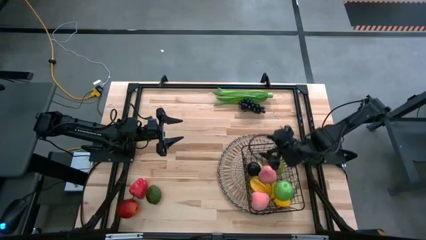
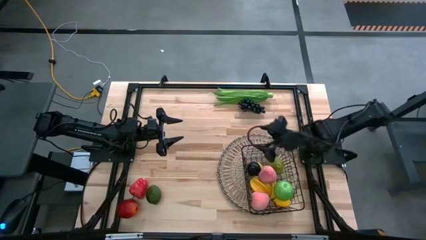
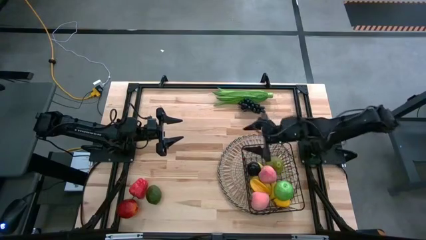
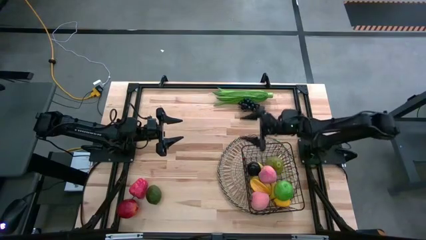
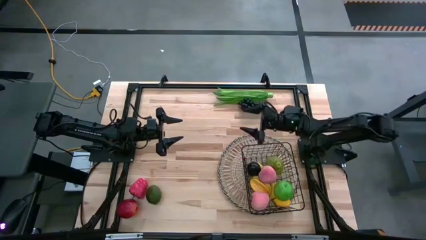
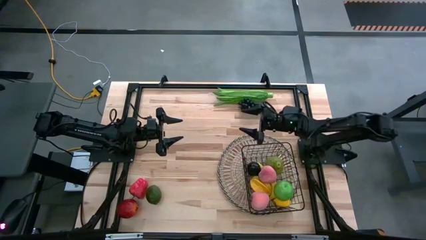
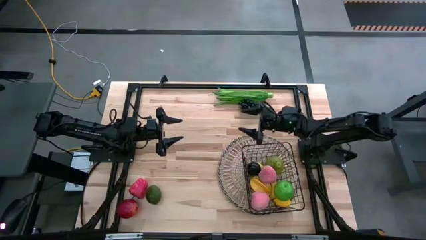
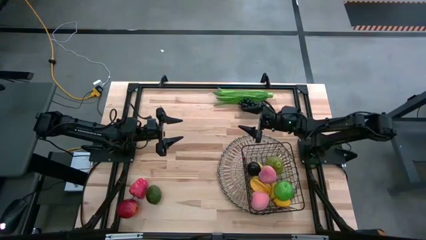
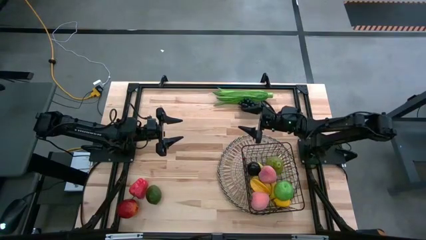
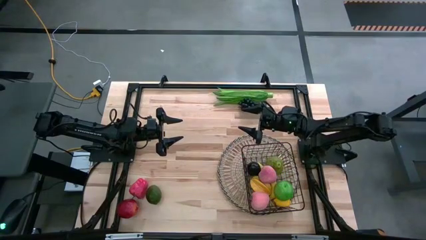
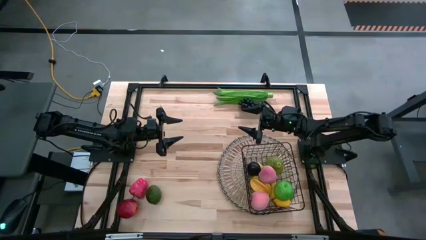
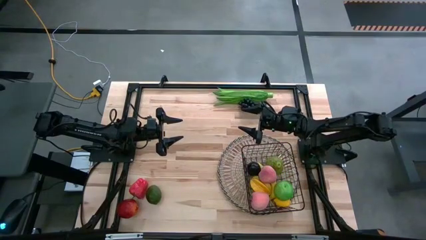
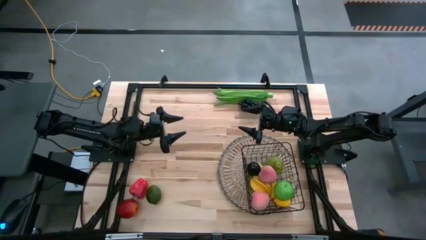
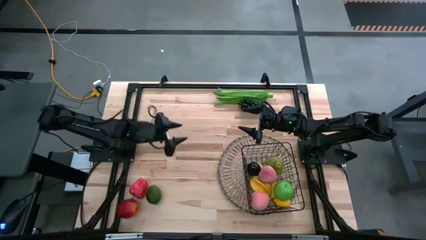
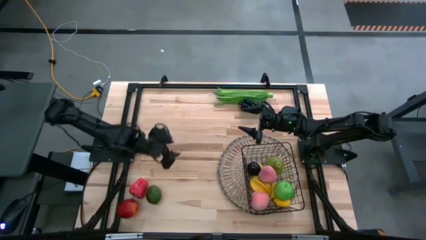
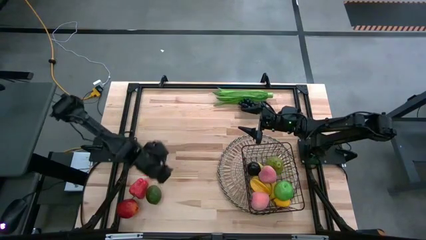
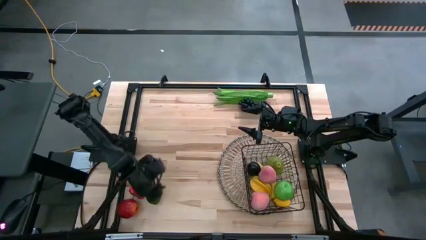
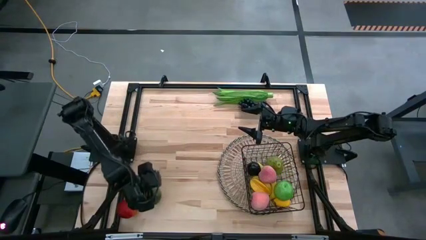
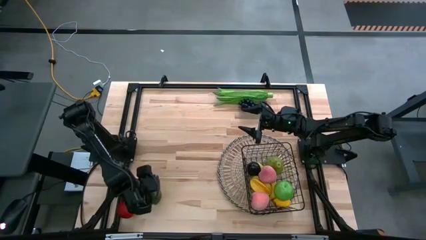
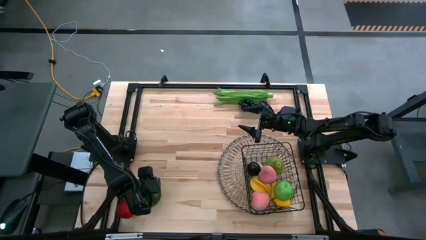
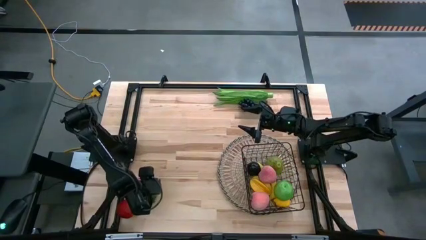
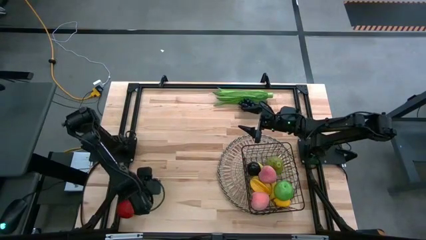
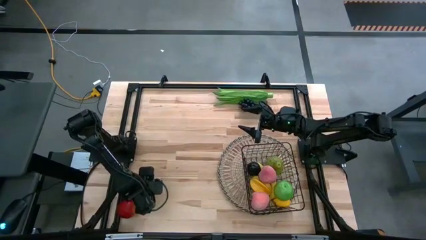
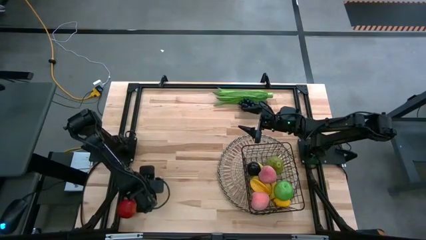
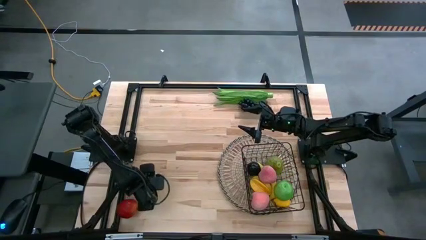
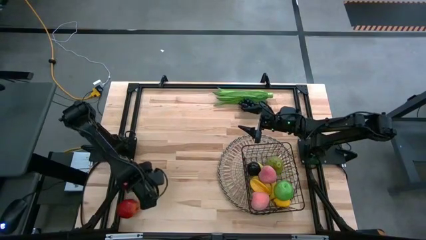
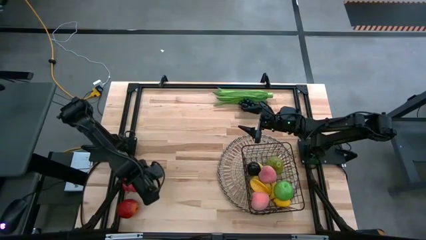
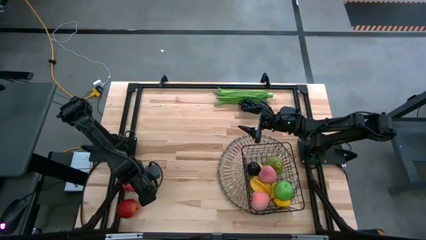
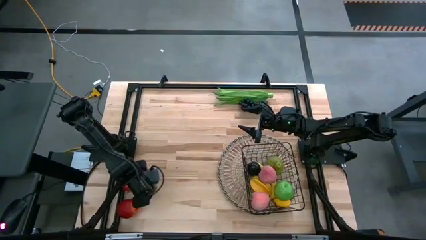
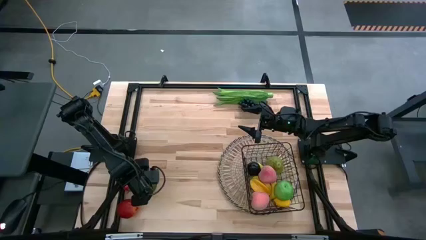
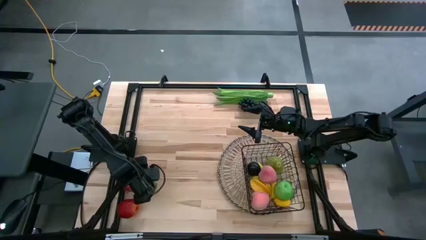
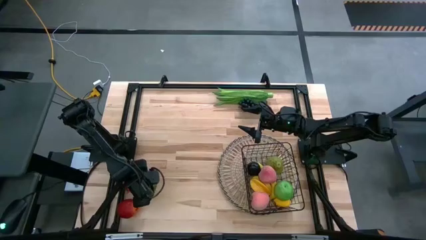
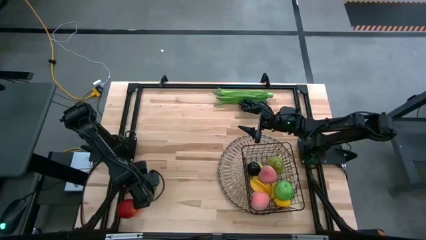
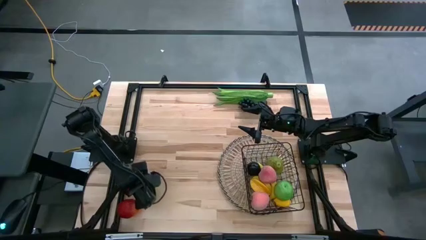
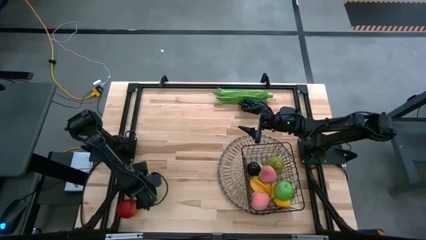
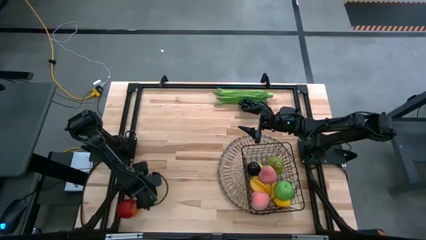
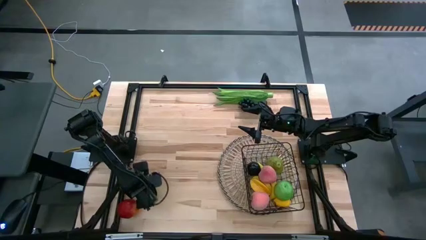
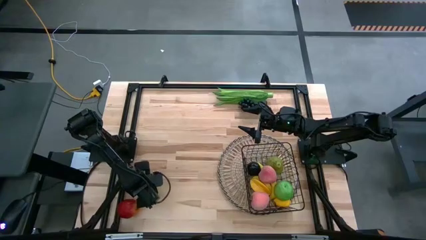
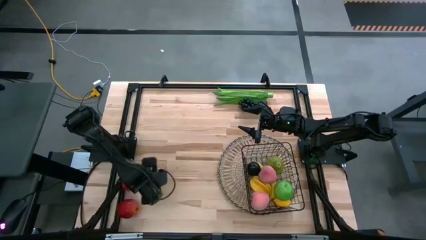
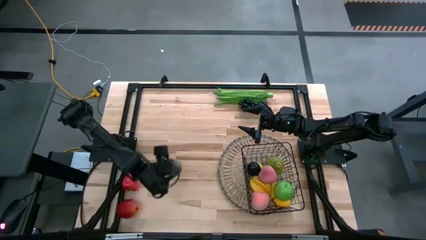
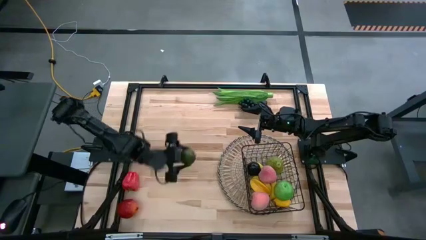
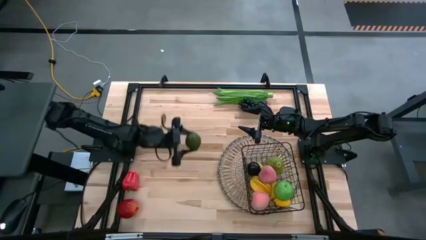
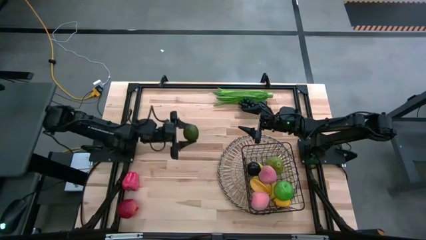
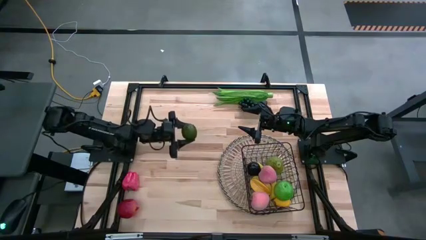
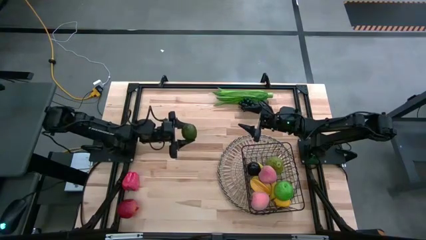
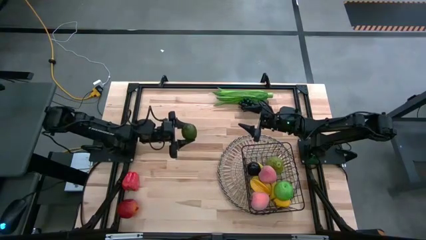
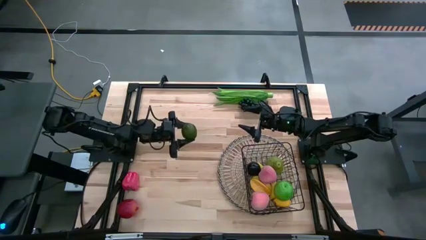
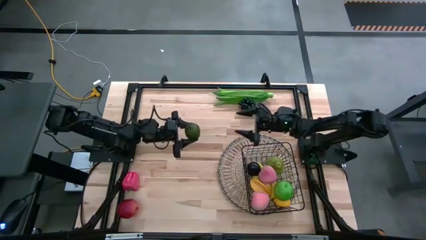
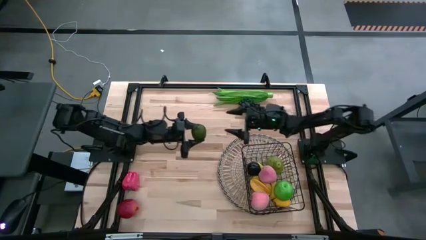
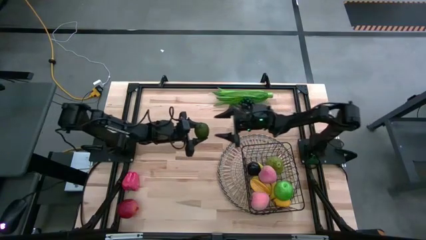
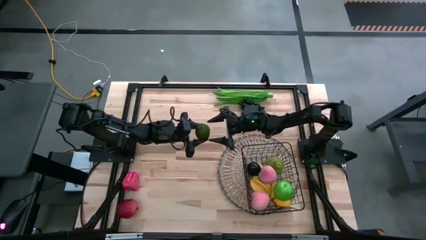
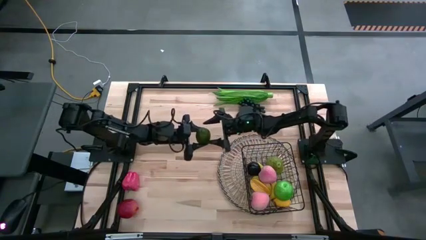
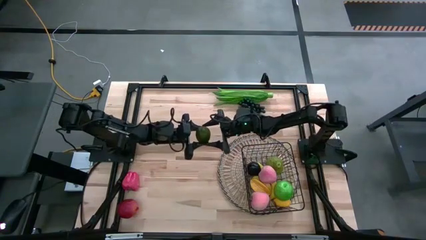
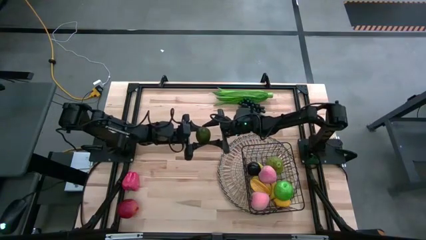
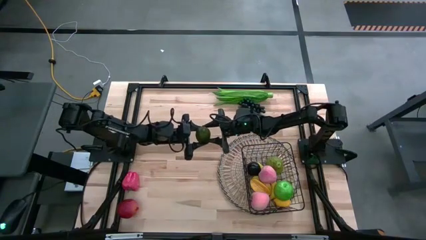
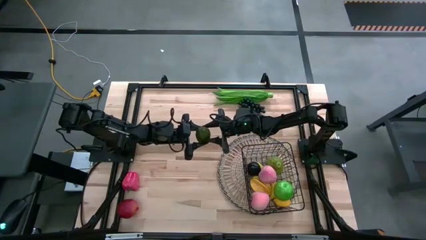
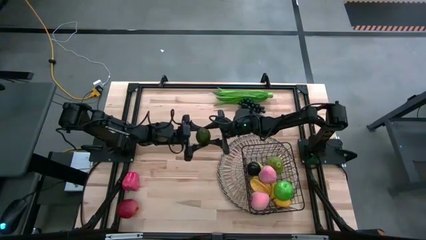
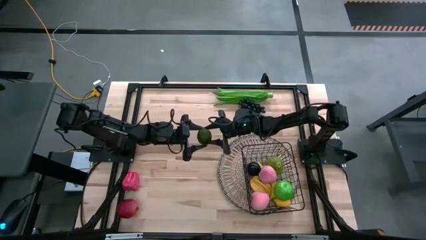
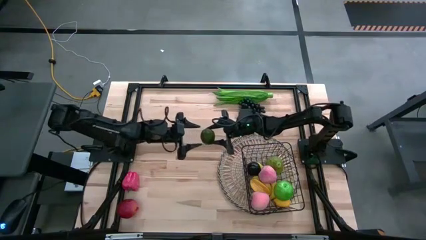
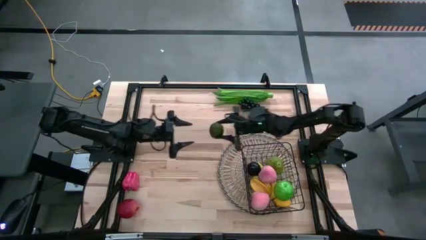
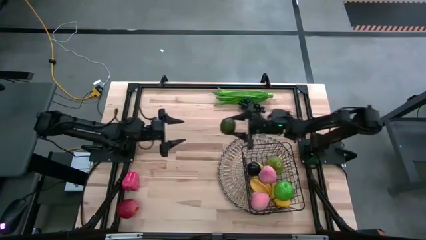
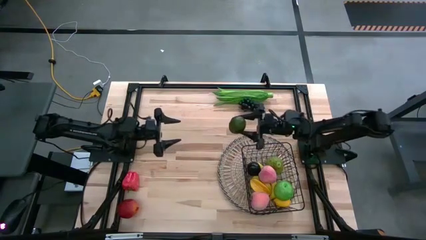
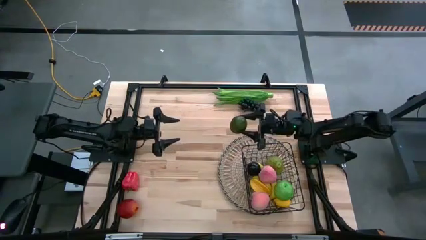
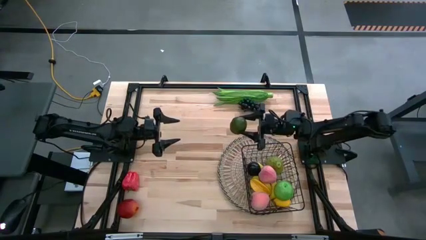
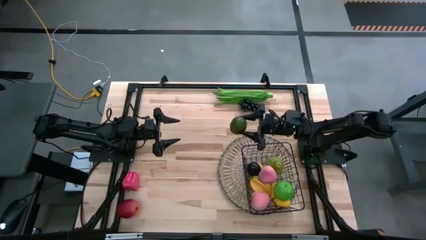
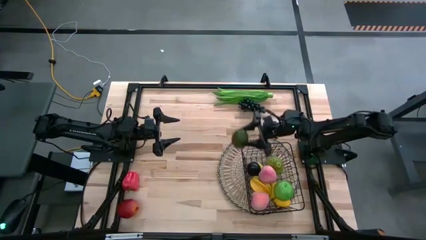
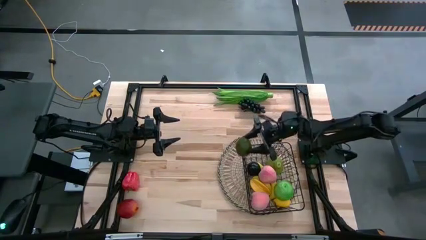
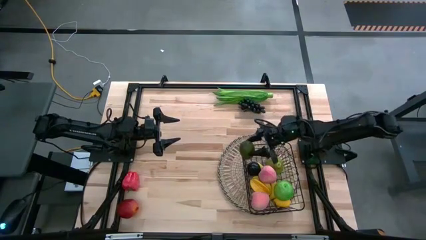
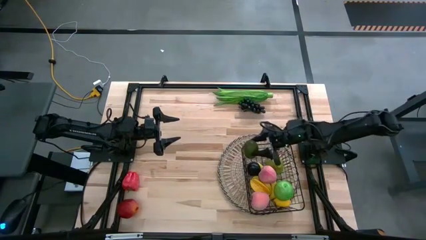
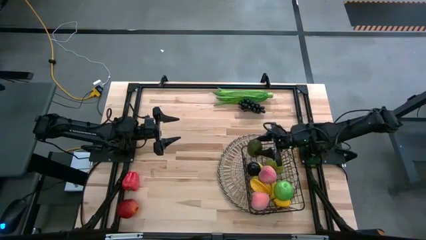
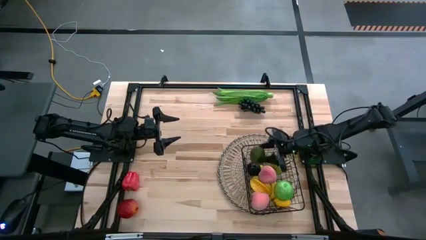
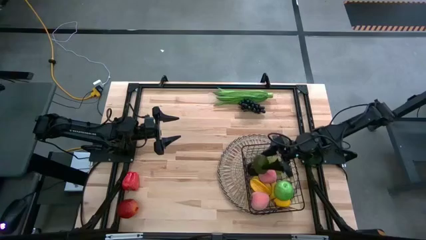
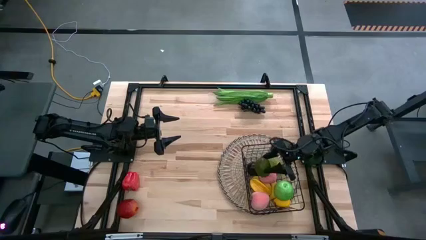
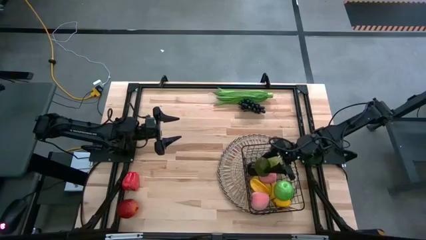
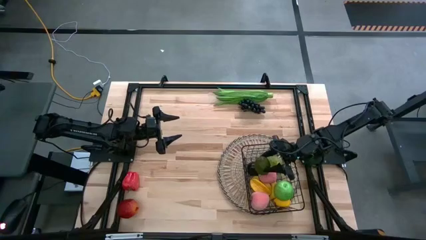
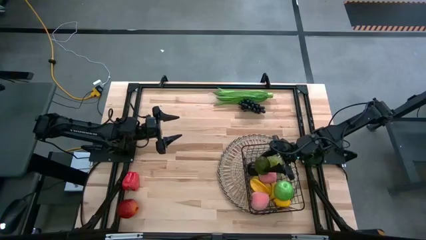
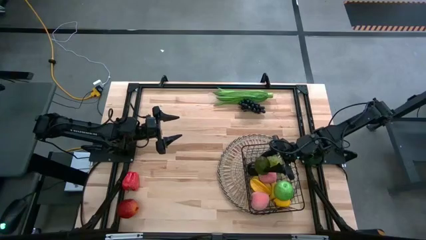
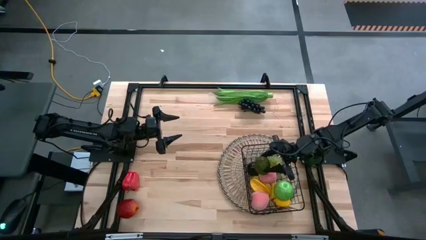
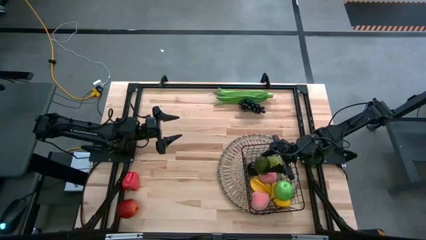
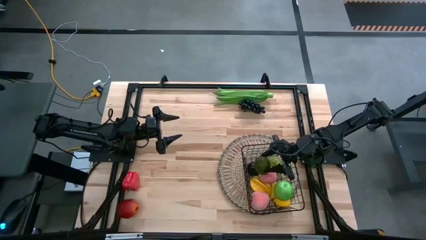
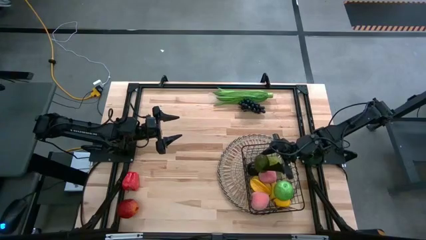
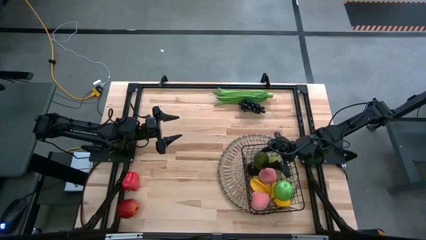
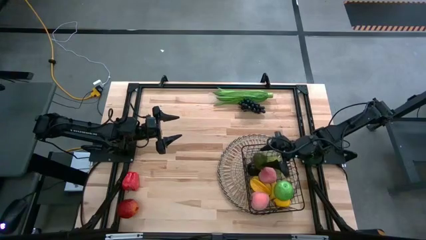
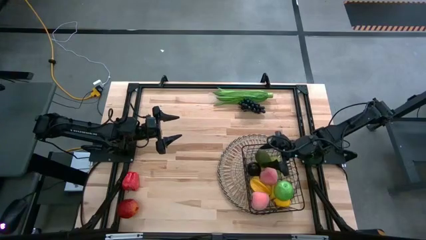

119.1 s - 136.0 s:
Task: Build produce basket
Put the green lime into the wire basket
